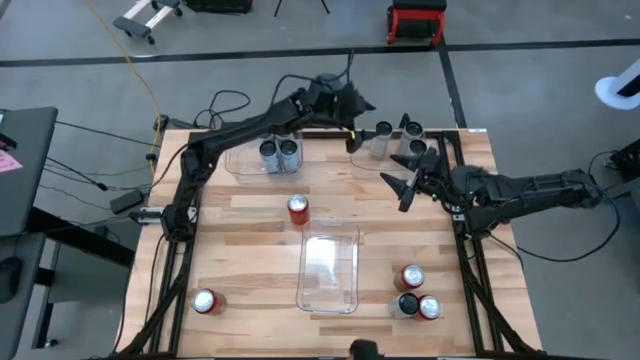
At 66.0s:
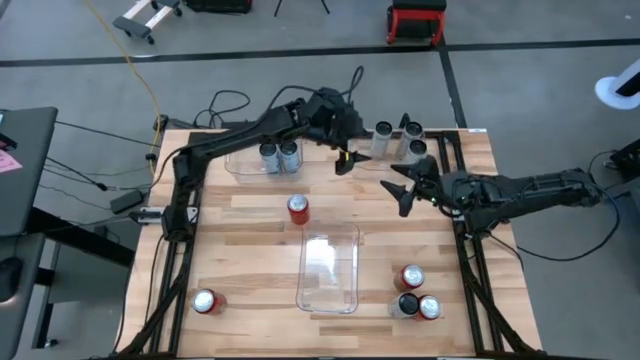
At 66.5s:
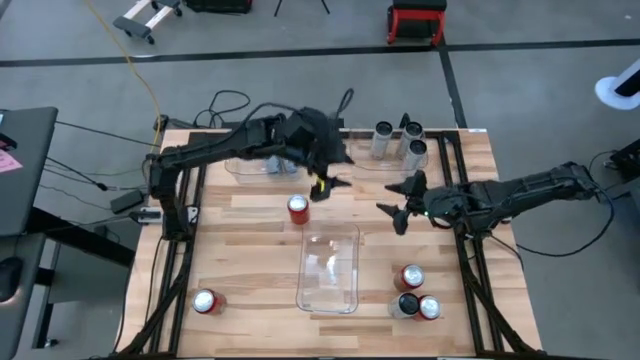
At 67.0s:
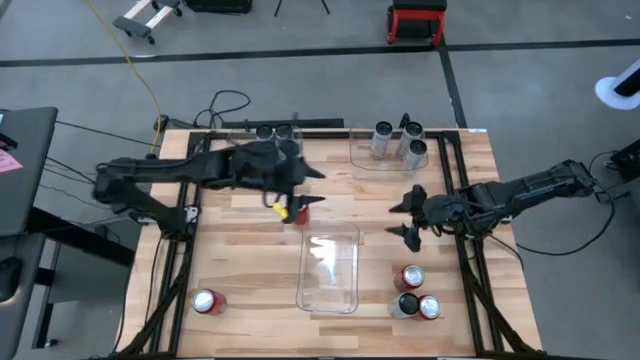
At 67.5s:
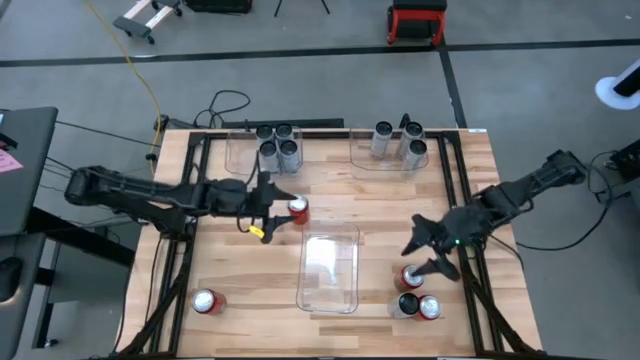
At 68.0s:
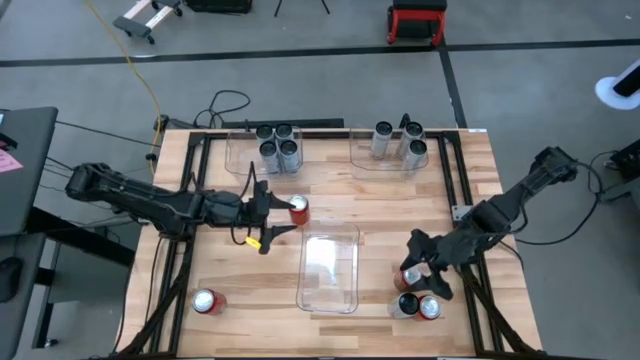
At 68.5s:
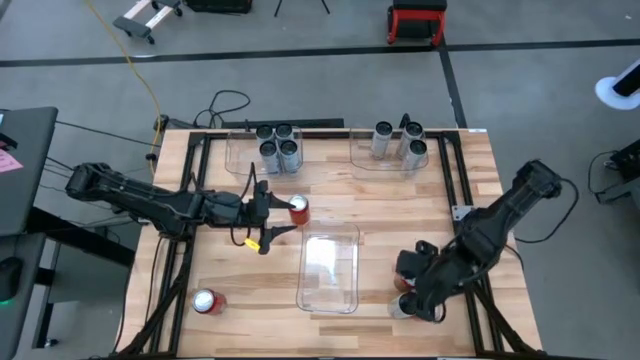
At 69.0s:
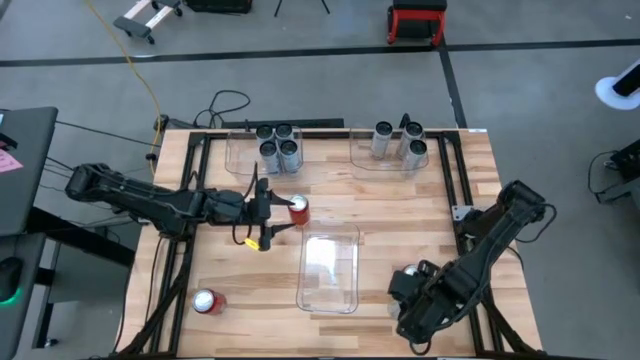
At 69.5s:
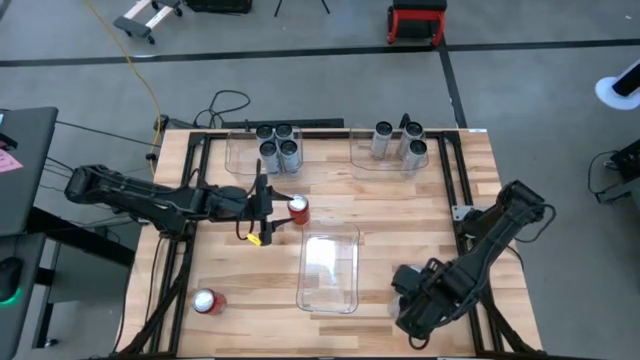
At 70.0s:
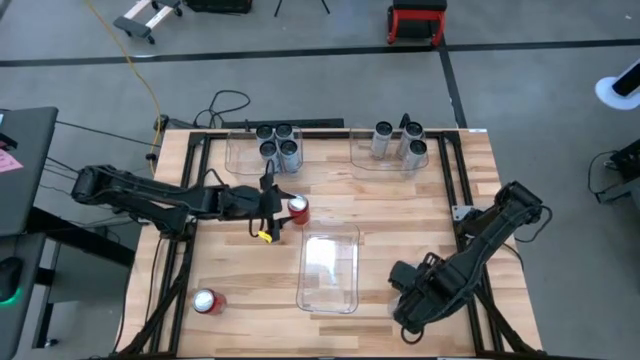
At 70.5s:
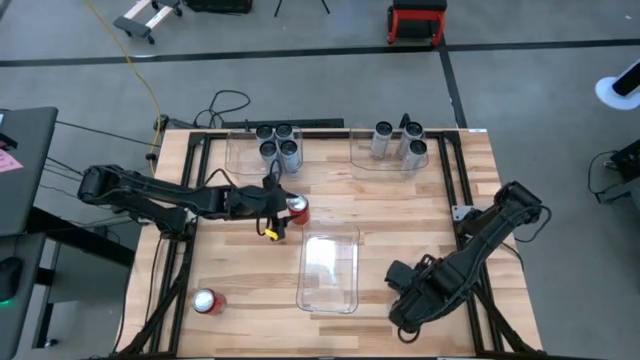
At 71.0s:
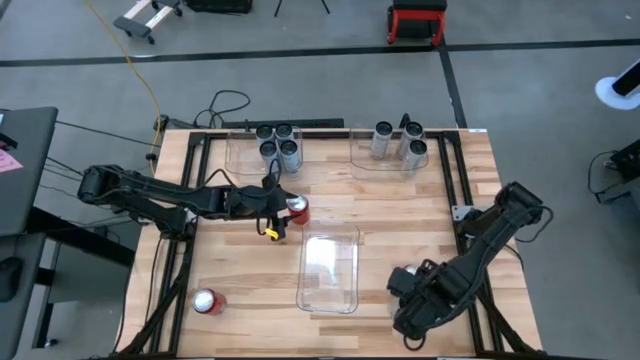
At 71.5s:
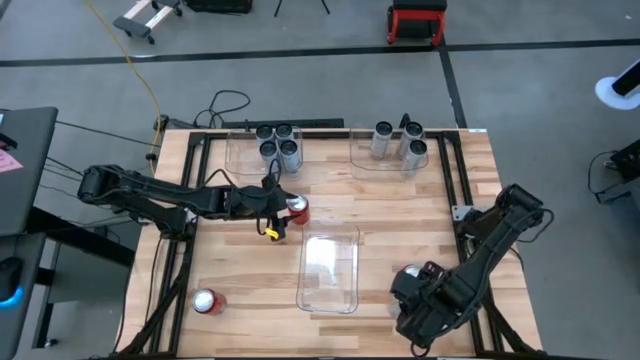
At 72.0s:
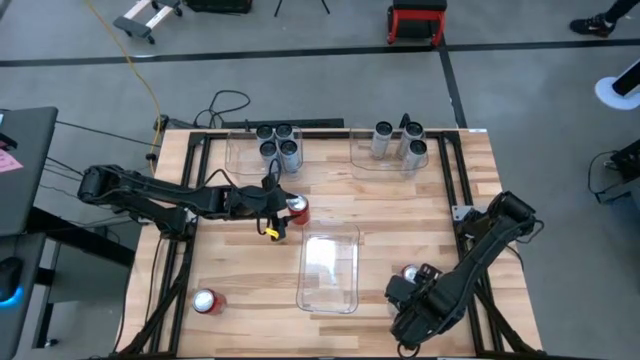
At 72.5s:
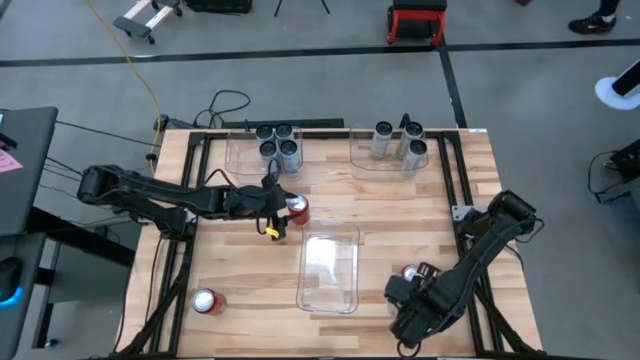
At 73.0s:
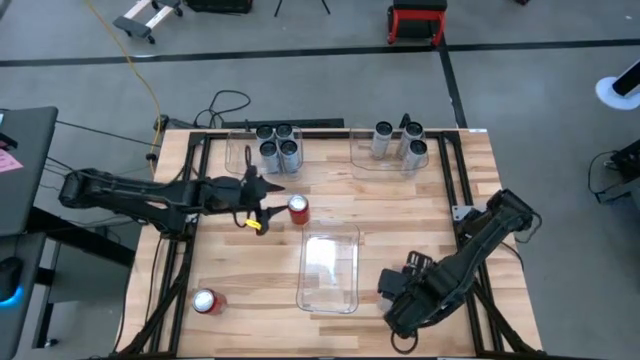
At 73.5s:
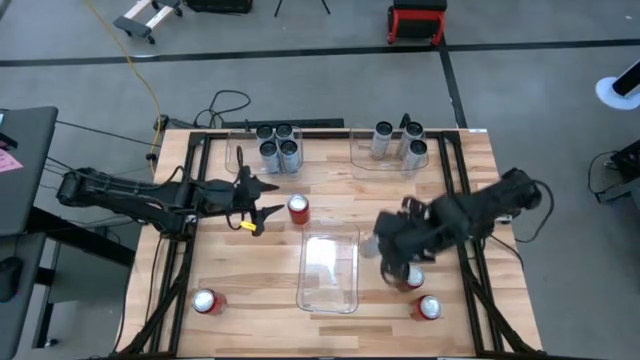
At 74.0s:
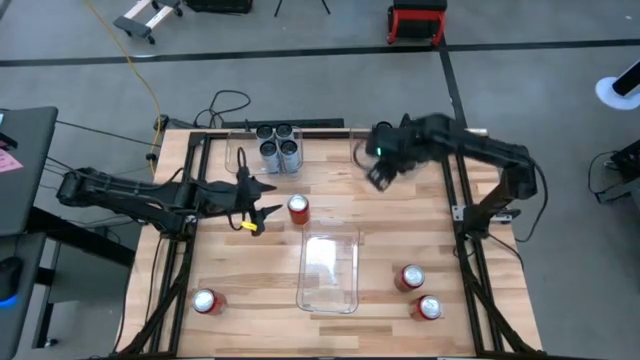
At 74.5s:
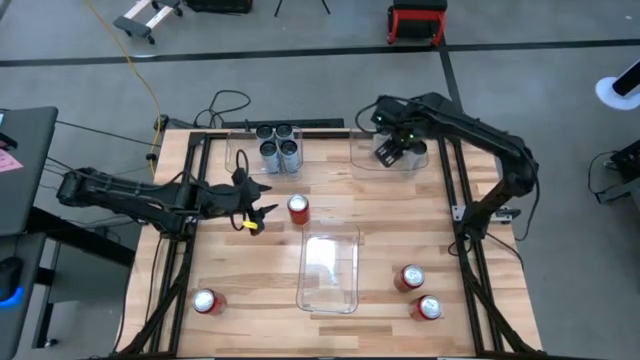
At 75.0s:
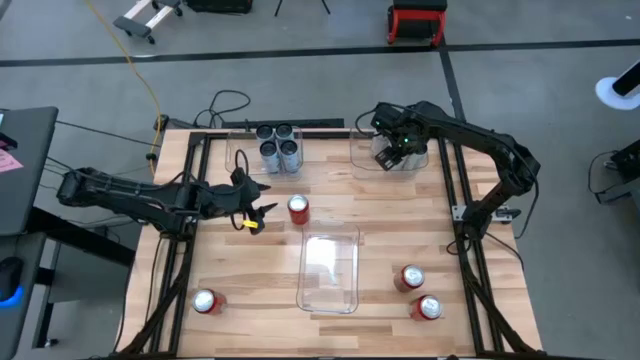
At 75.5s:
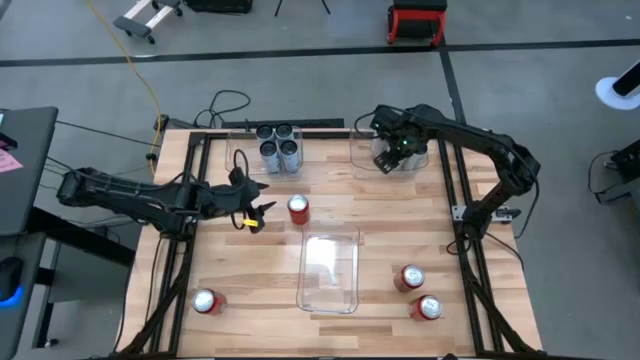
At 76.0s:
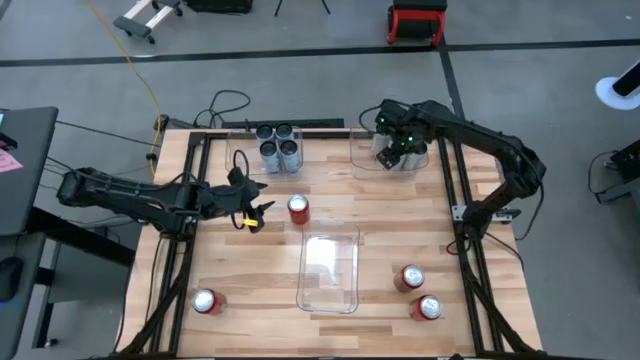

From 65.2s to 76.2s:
Task: Sort soda cans
Put the white-yellow soda can into the top right transparent bin

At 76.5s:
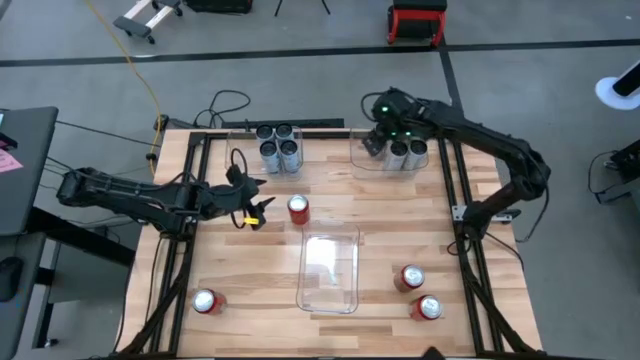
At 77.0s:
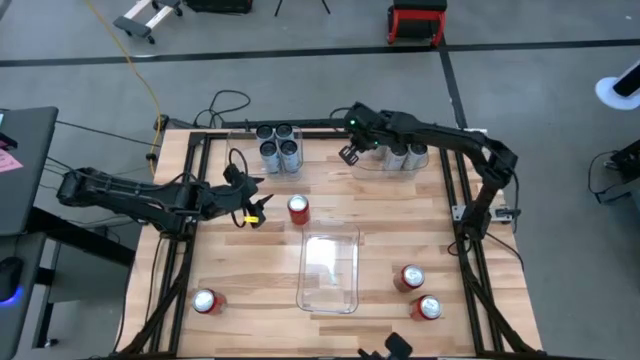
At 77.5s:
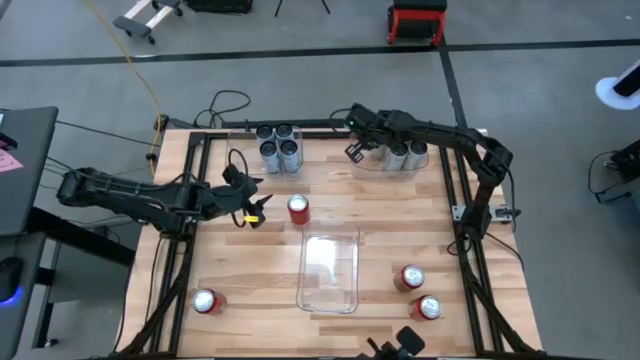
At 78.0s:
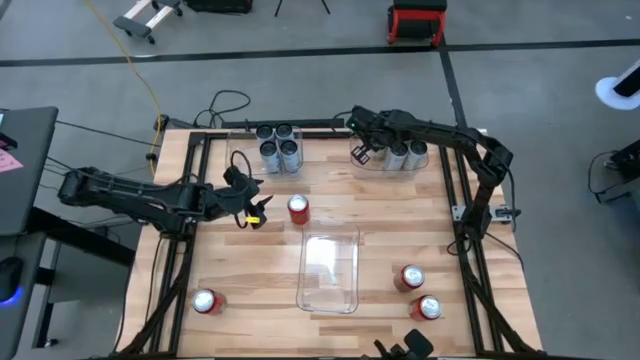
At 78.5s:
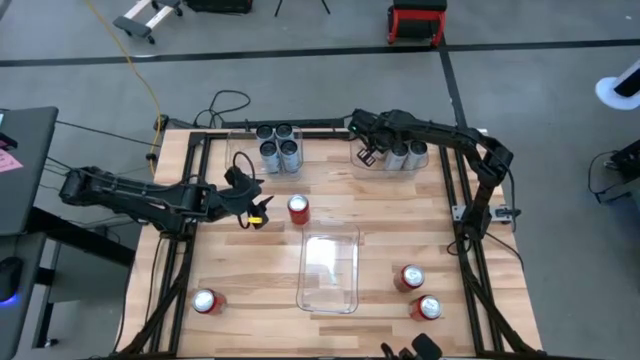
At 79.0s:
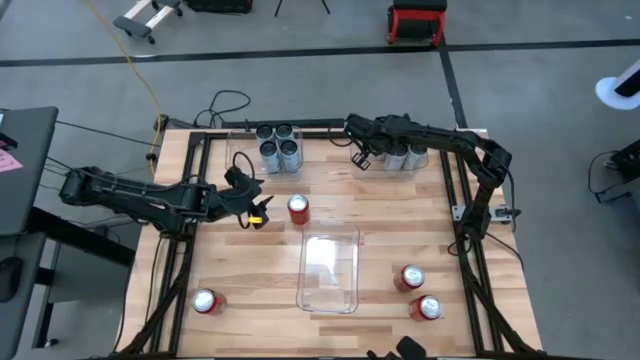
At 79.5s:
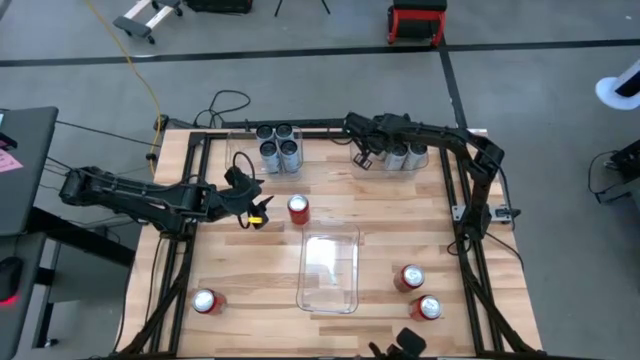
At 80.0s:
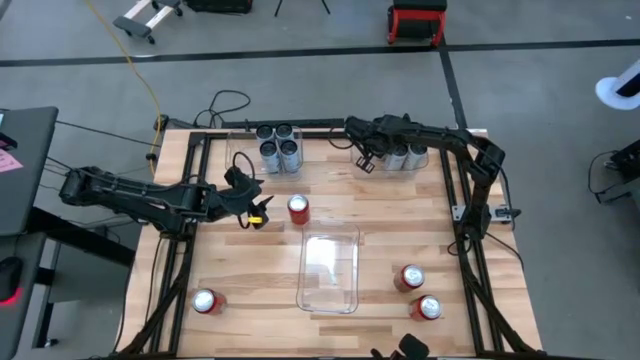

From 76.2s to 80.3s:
Adjust the white-yellow soda can in the top right transparent bin

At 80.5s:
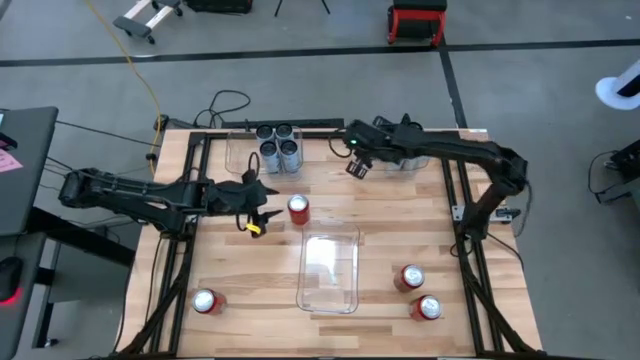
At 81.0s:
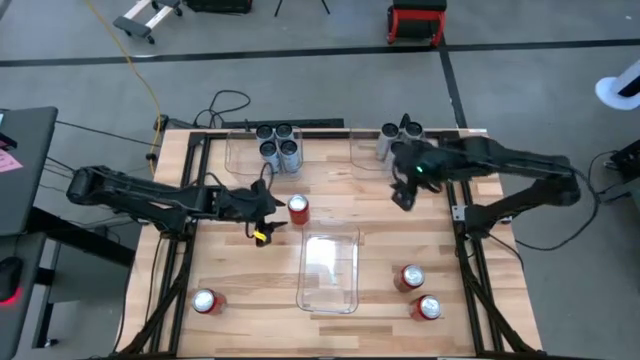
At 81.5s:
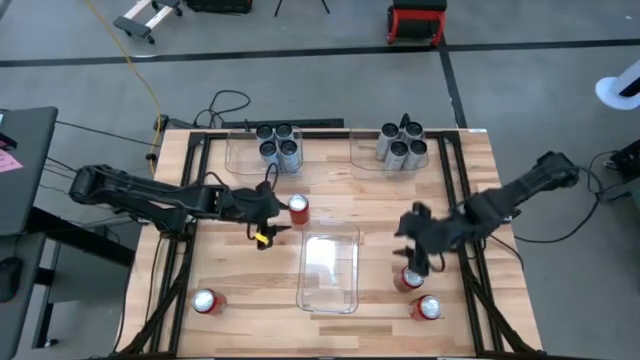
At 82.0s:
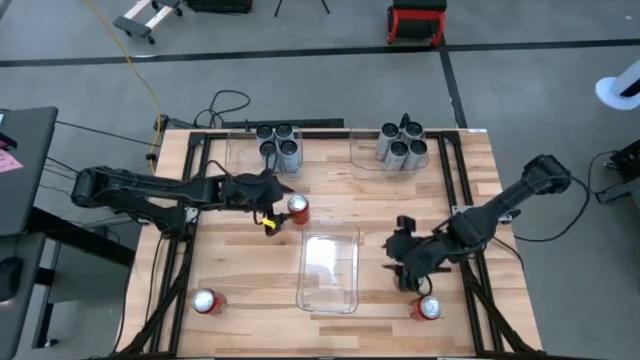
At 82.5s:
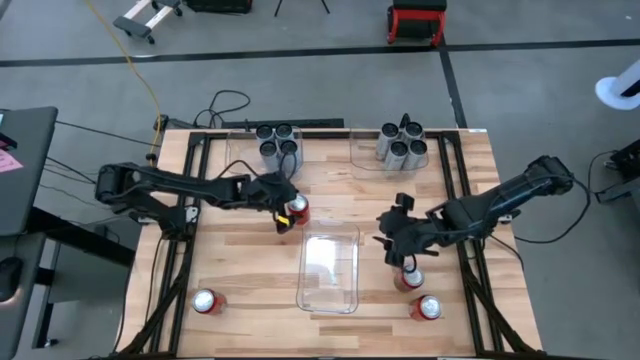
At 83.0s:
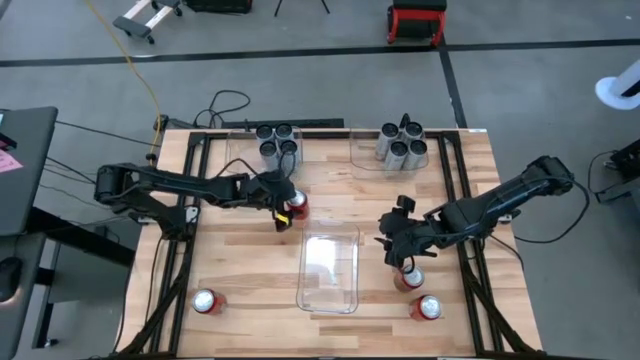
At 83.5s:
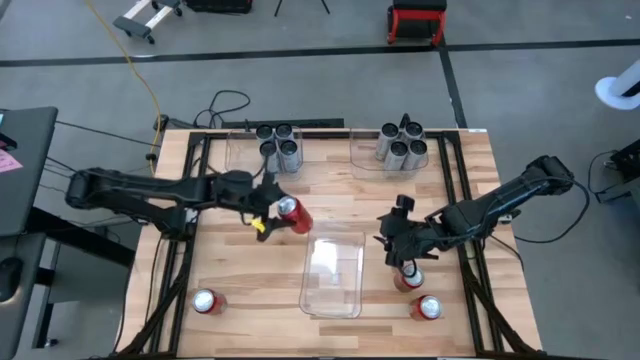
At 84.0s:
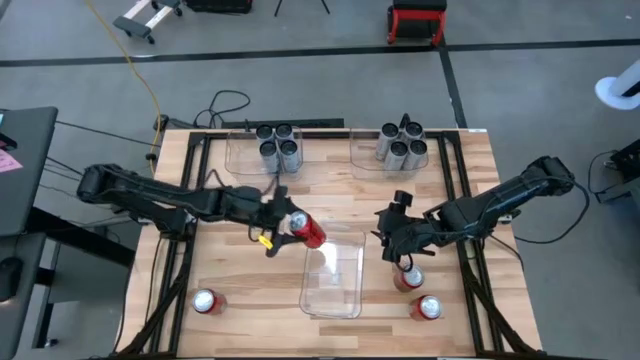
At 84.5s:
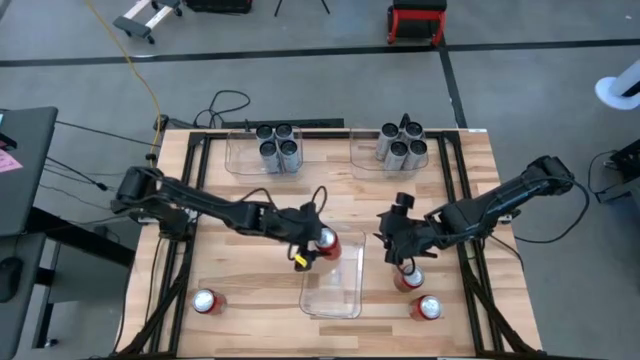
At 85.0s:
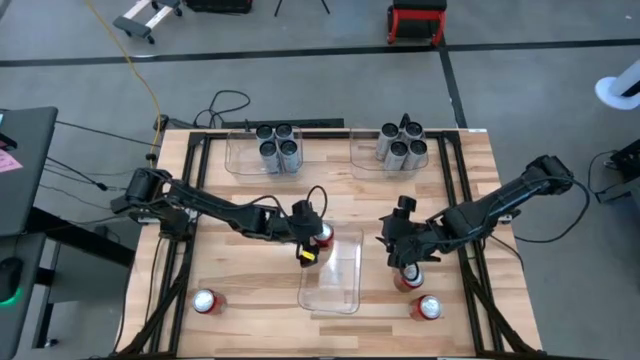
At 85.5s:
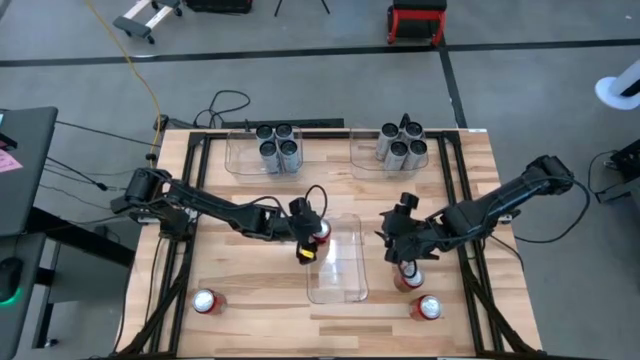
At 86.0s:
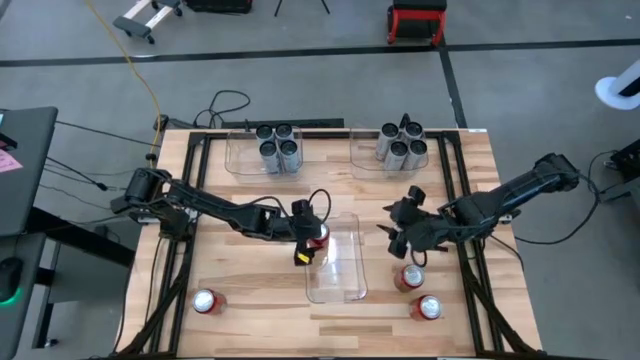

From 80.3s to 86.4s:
Put the red-black soda can into the bottom transparent bin
